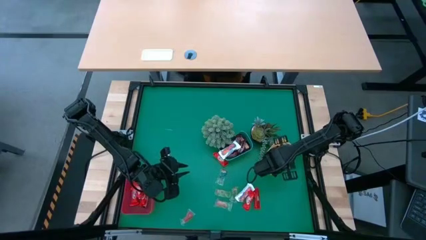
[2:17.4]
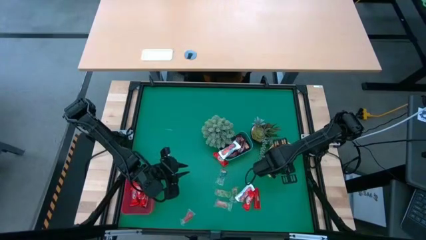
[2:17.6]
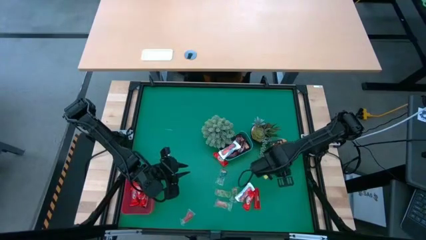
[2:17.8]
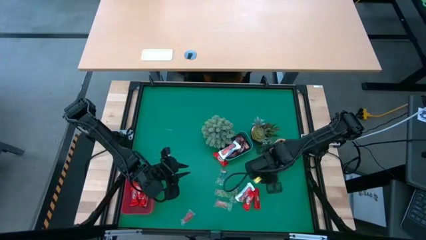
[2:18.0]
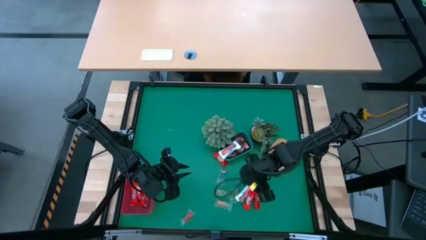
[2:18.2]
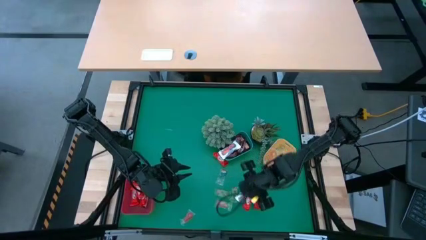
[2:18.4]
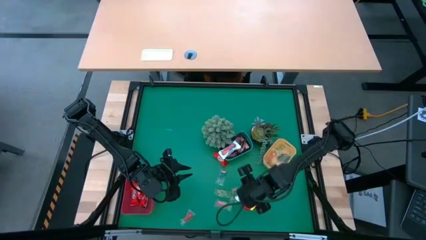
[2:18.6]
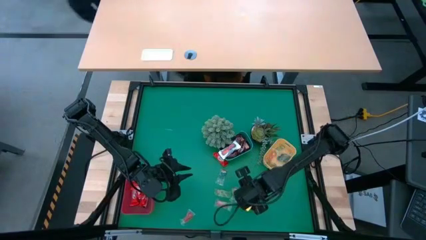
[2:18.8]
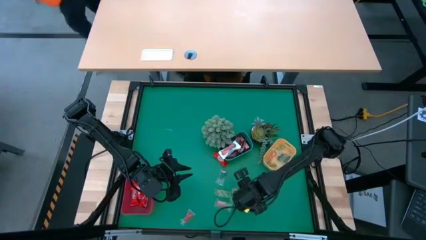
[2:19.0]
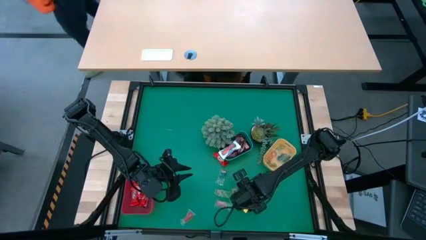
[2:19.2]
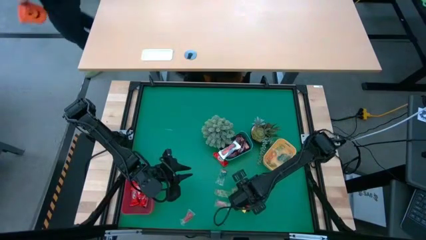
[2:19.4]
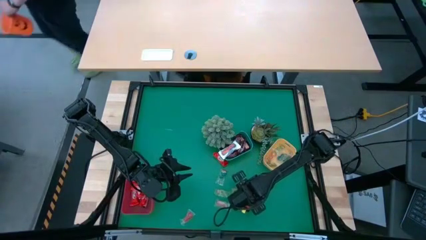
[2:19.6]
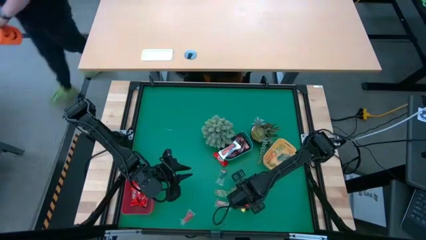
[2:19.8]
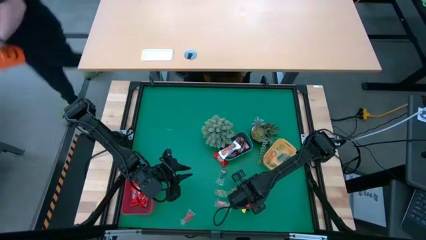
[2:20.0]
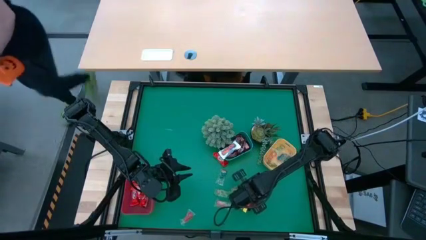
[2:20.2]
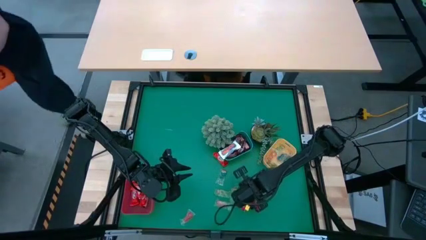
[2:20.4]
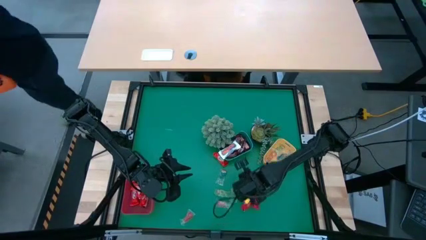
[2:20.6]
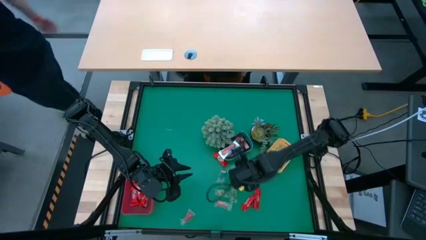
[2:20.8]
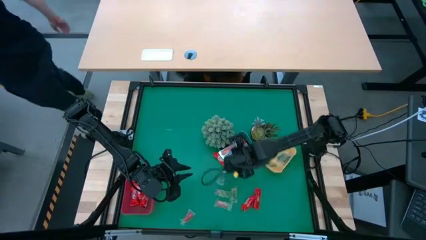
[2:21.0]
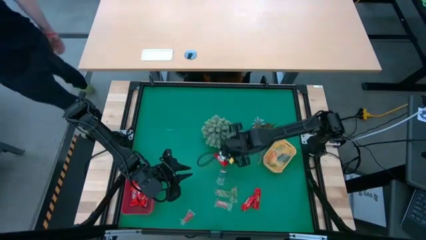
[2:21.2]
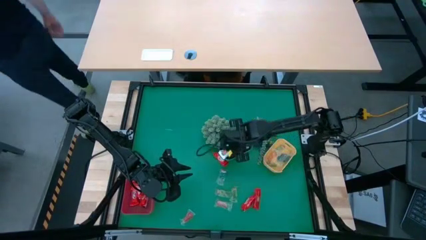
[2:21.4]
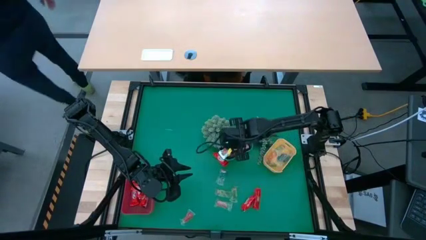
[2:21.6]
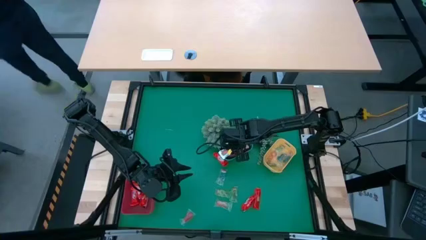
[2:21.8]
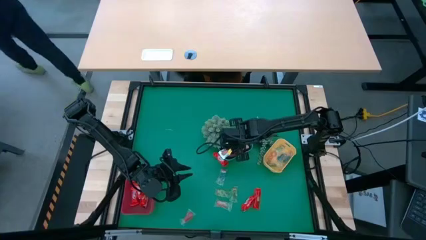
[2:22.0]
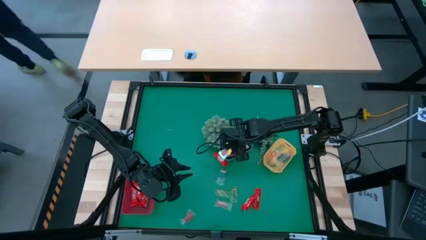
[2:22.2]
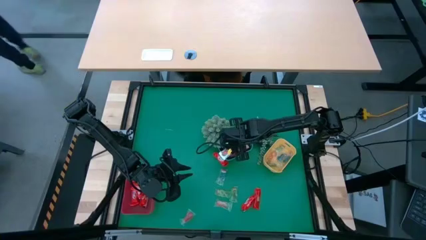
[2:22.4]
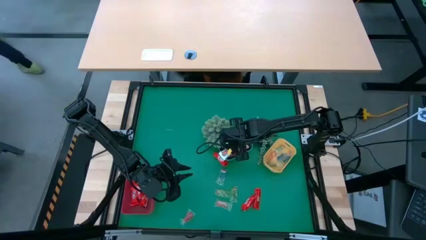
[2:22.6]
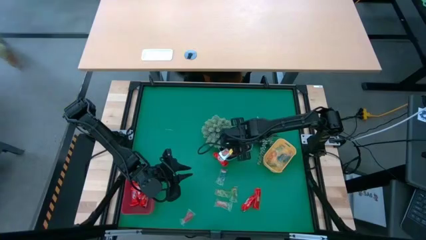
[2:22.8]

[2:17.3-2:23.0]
Task: Organize candy in baskets
Put the white chocolate into the blue bin

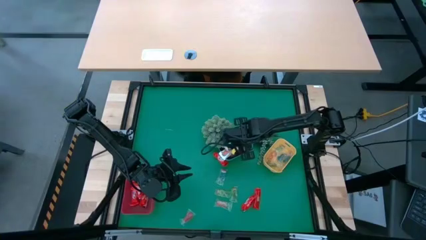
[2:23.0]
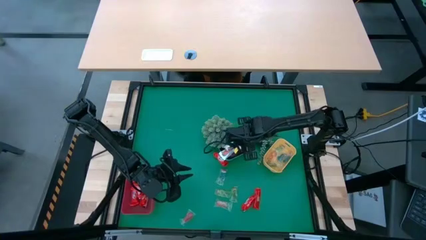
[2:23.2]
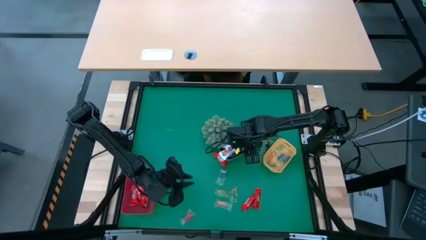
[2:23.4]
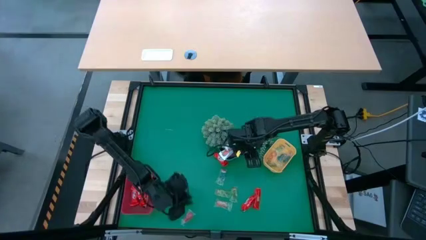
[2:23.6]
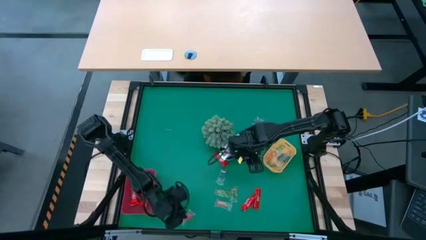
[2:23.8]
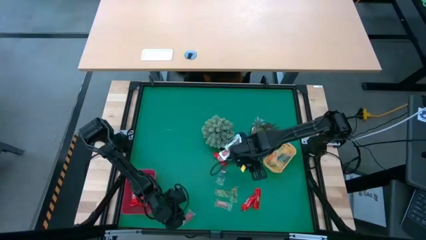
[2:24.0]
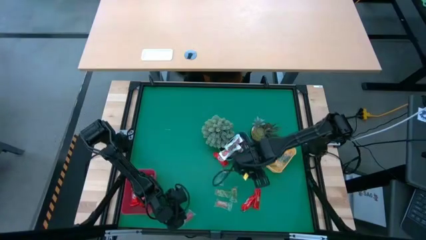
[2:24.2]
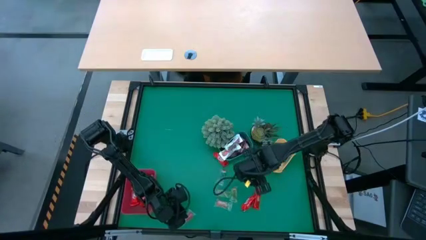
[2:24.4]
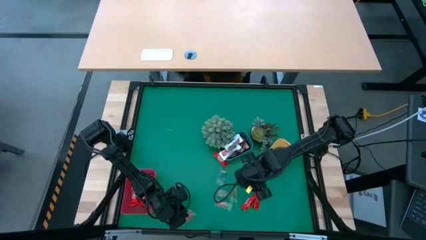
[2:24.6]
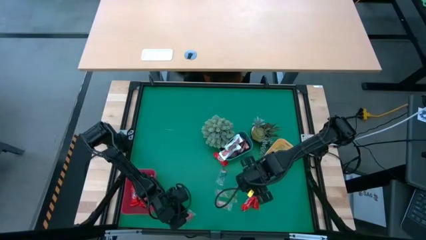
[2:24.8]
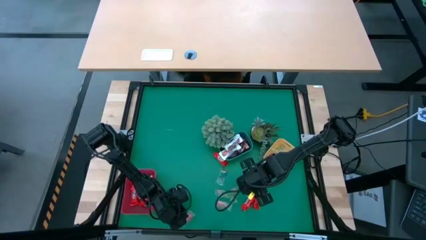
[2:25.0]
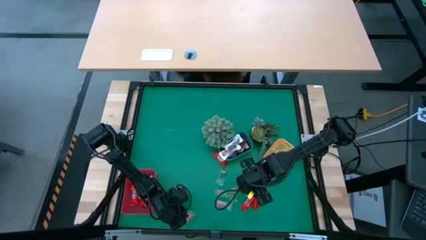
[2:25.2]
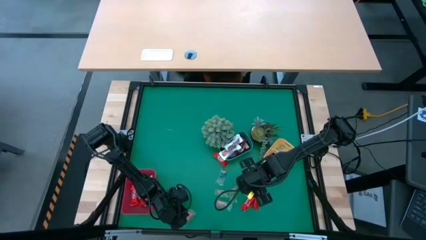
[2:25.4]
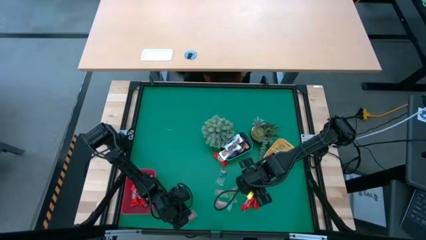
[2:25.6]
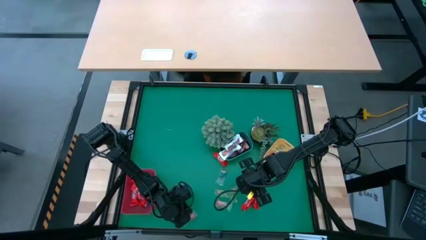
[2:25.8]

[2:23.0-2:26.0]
Put the red gummy into the yellow bin

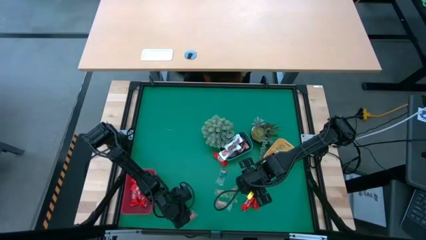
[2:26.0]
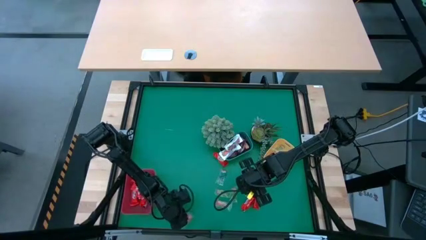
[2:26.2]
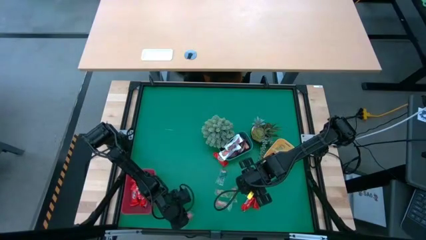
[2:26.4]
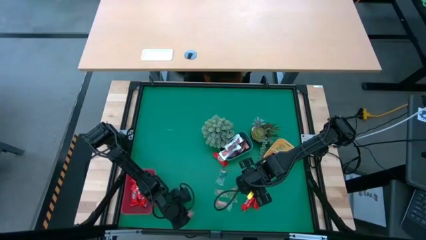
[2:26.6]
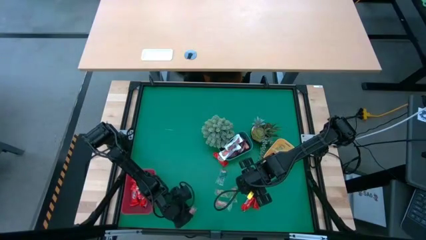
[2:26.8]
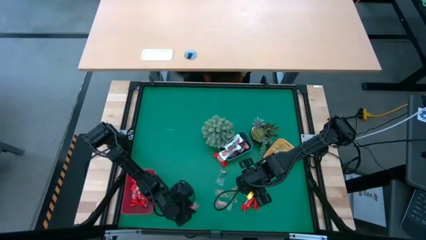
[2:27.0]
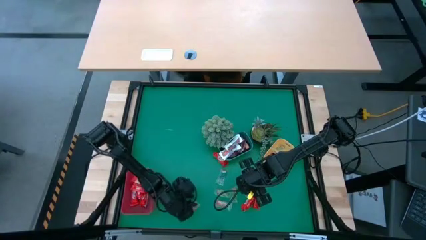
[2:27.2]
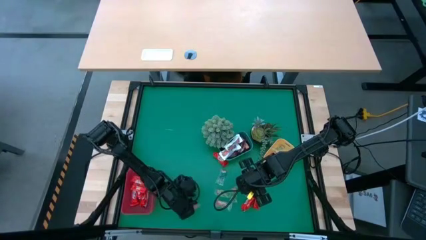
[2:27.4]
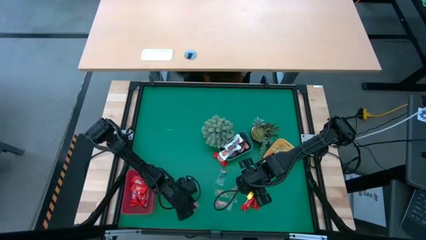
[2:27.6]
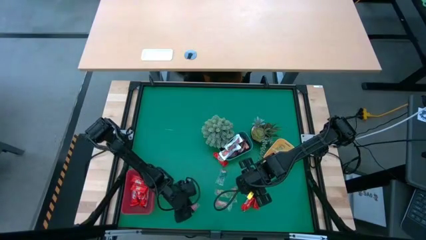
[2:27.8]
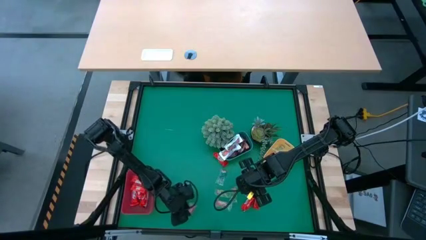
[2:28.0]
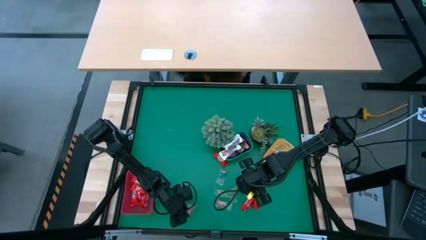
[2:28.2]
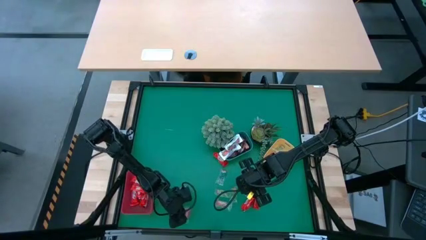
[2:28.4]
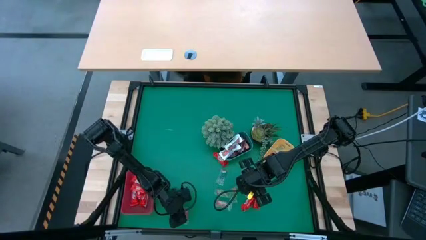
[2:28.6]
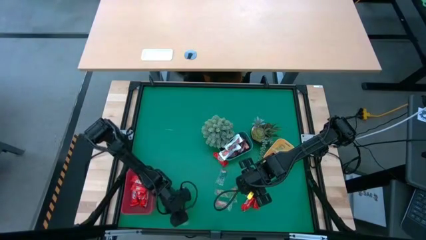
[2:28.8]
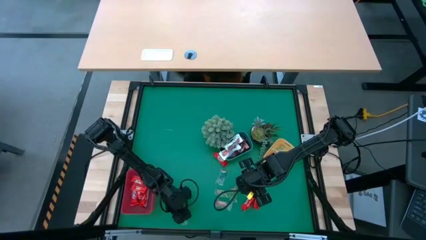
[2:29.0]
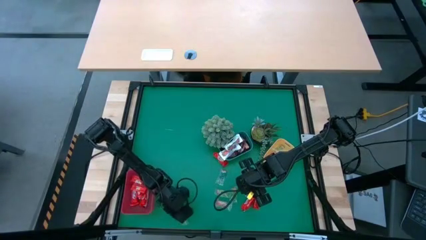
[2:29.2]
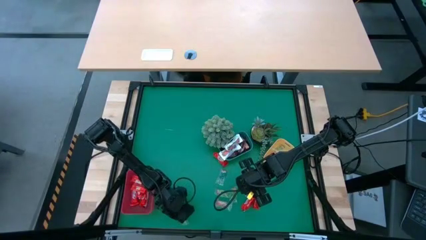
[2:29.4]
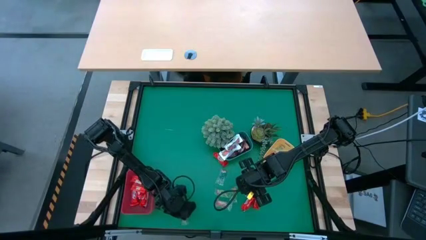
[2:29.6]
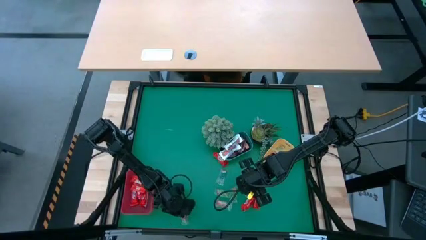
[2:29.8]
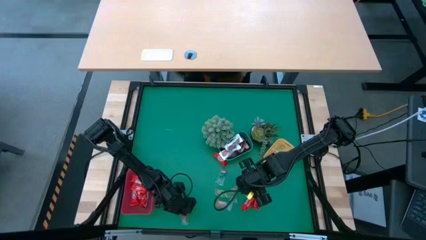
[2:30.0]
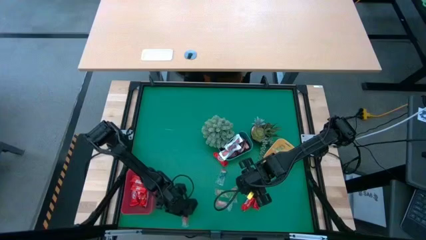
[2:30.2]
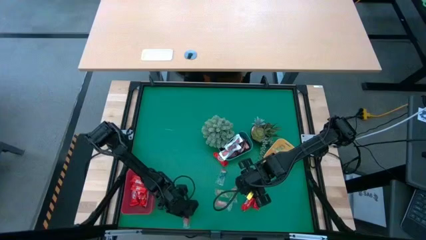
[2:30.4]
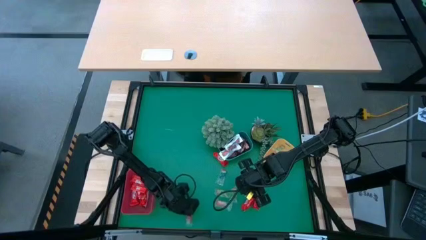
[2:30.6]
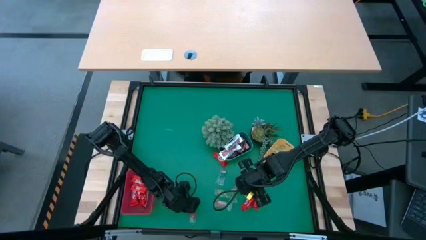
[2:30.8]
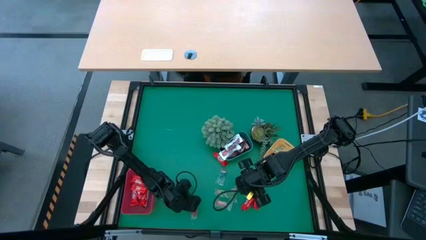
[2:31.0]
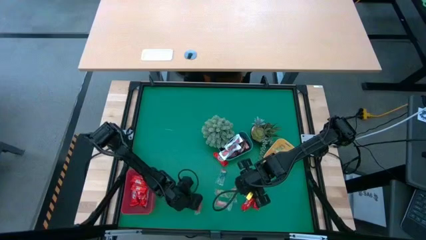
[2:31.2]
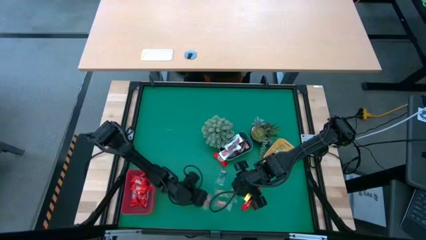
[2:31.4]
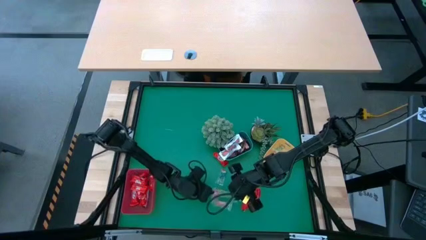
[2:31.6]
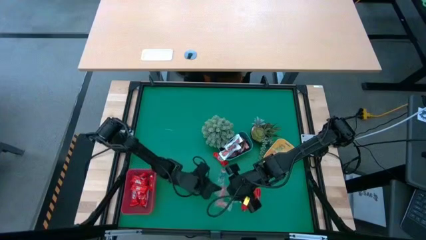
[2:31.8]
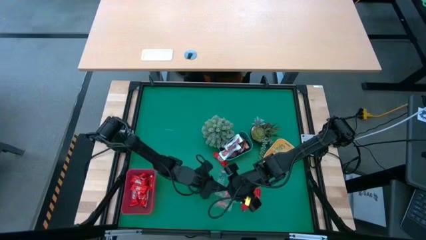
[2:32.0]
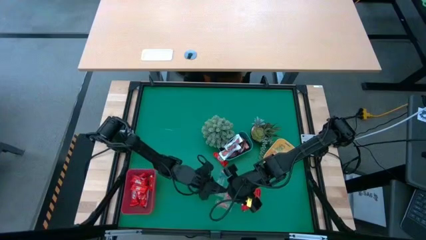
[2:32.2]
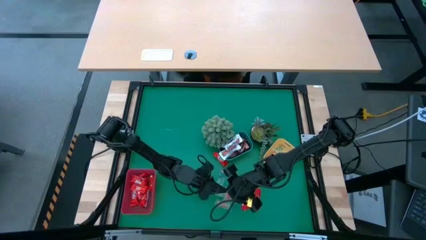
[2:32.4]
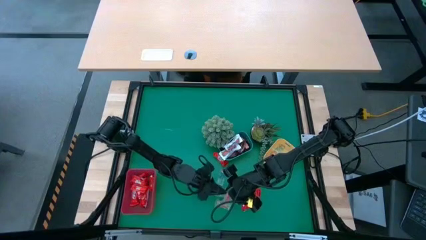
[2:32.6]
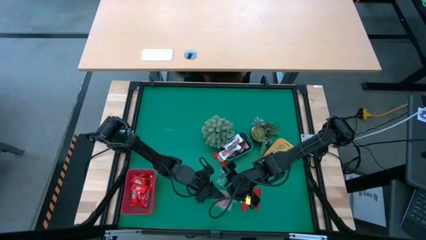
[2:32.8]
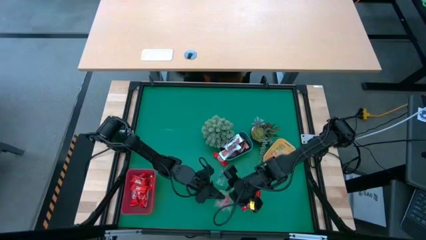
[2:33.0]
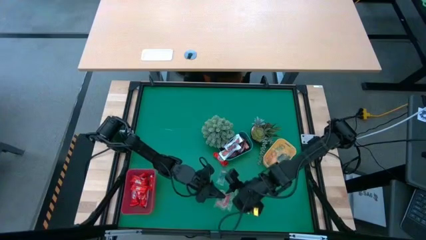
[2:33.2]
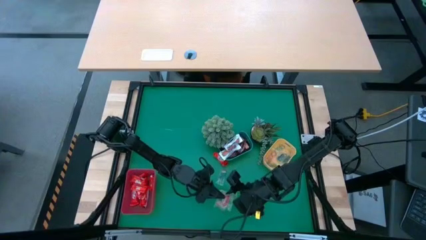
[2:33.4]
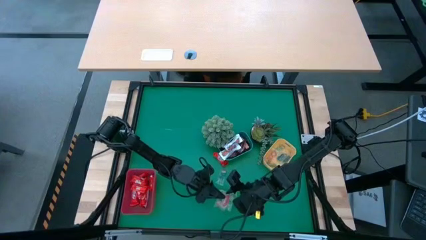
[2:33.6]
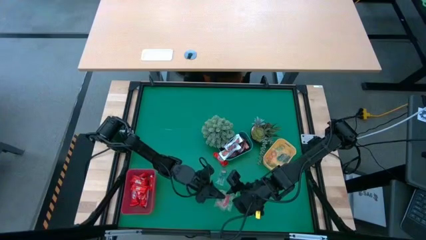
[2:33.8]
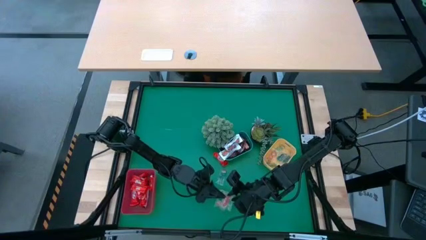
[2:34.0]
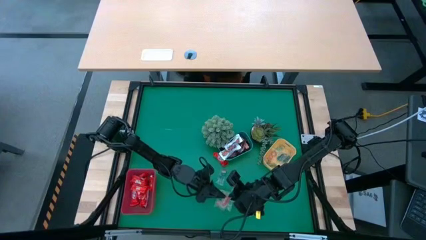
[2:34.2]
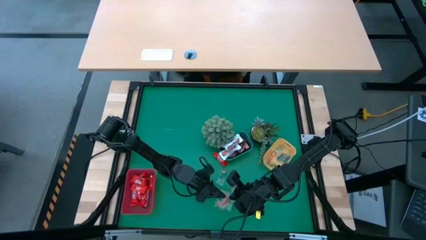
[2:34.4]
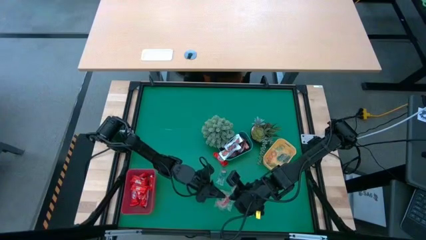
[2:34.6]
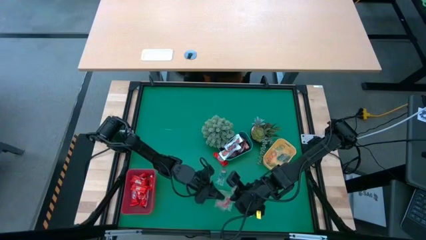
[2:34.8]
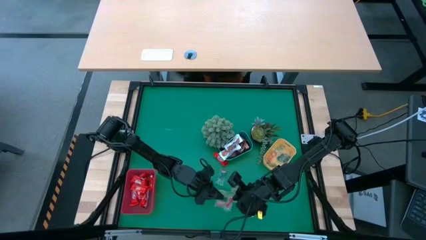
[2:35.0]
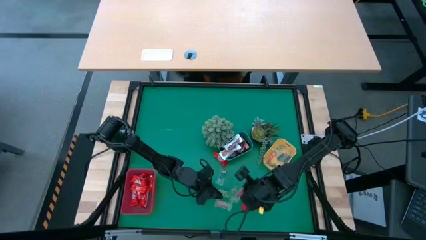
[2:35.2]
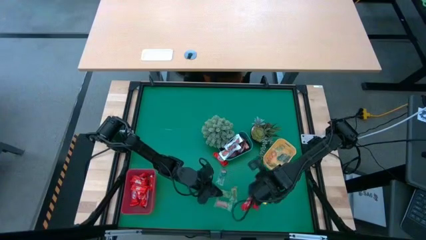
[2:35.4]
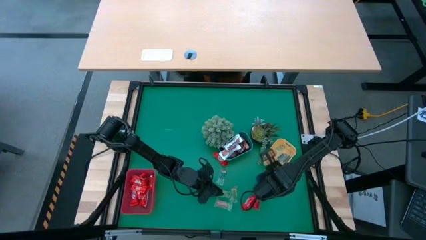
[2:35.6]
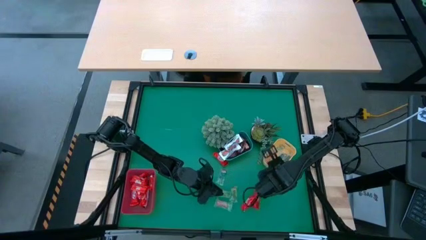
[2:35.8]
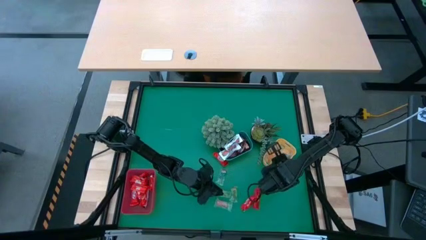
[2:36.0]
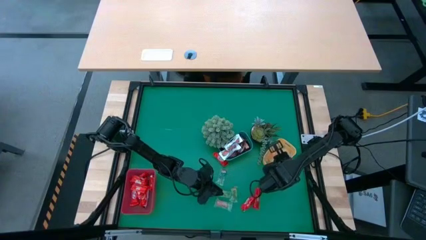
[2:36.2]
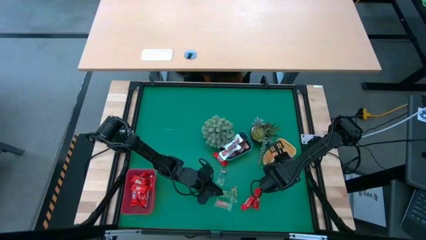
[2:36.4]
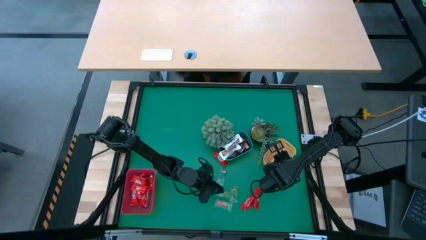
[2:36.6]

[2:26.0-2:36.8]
Put the red gummy into the yellow bin
